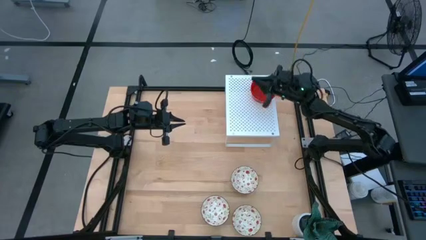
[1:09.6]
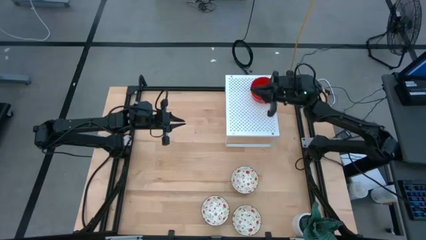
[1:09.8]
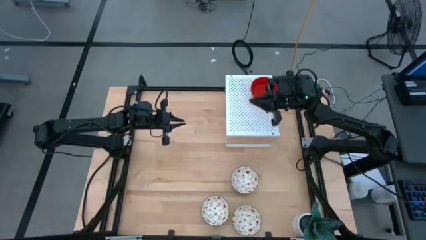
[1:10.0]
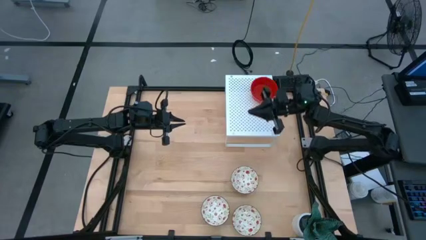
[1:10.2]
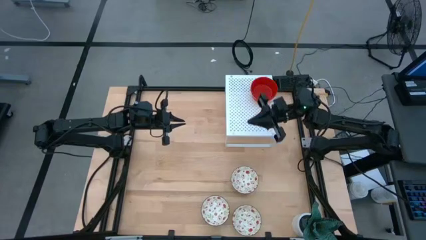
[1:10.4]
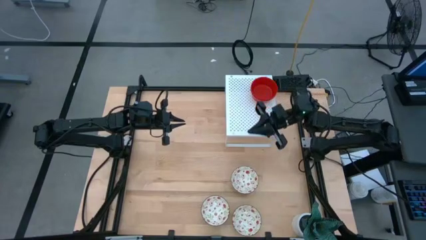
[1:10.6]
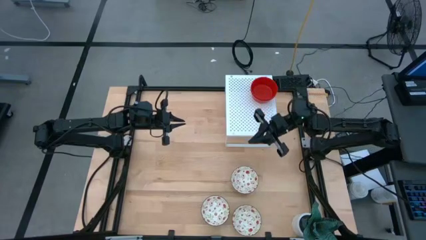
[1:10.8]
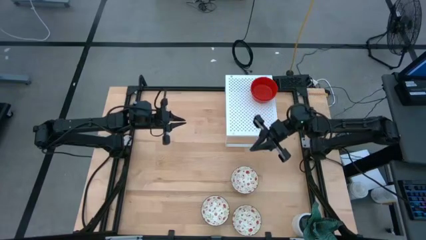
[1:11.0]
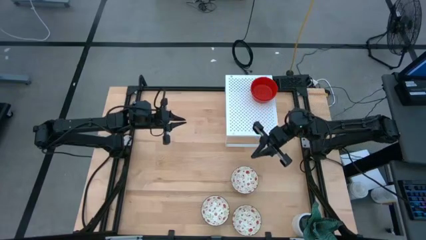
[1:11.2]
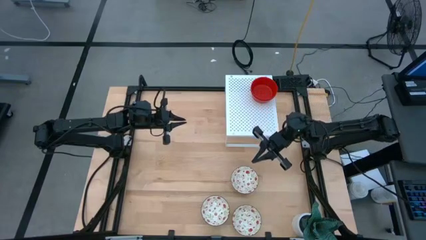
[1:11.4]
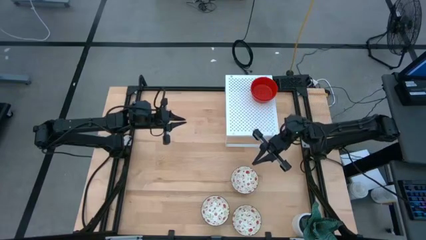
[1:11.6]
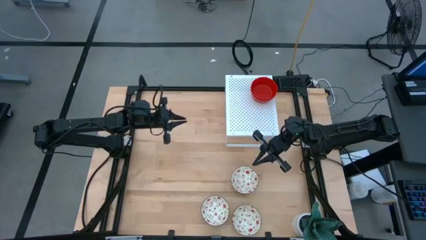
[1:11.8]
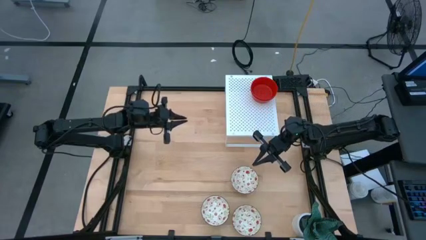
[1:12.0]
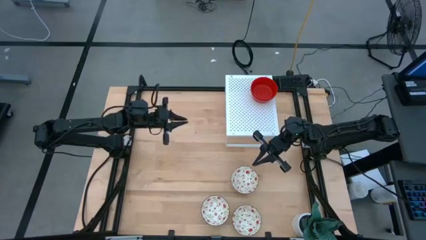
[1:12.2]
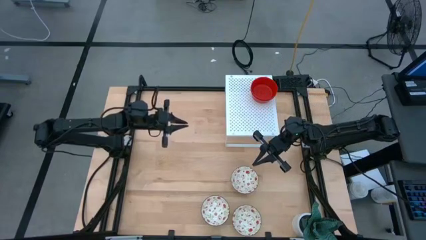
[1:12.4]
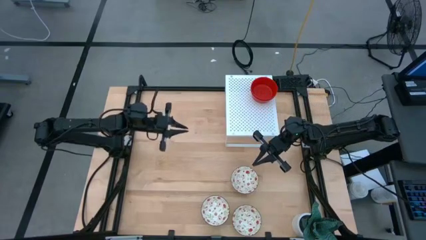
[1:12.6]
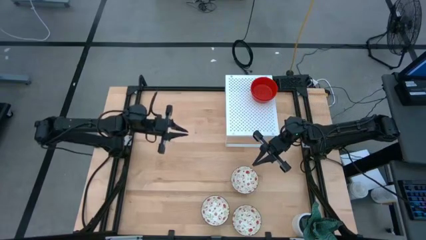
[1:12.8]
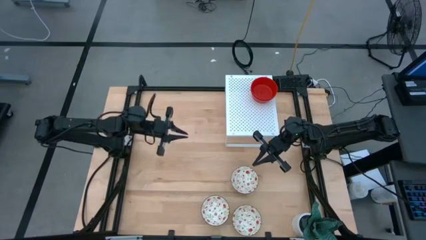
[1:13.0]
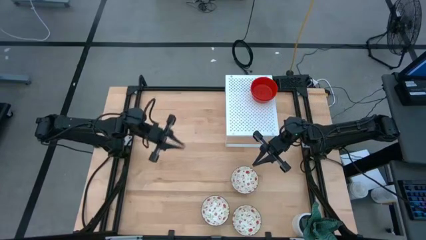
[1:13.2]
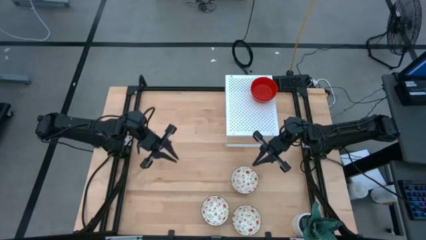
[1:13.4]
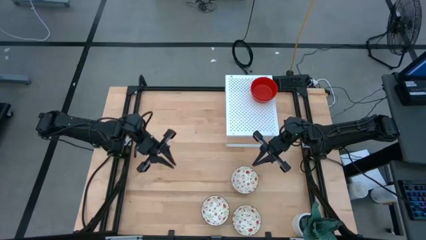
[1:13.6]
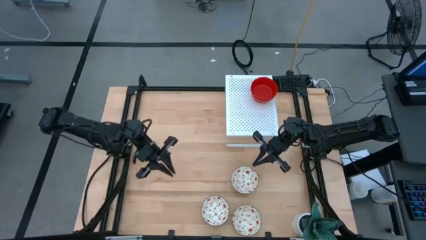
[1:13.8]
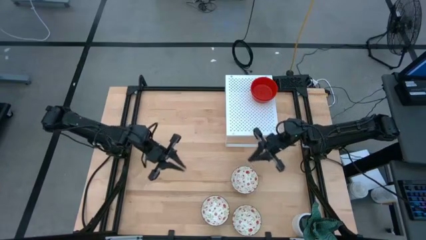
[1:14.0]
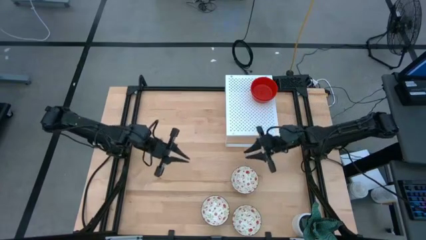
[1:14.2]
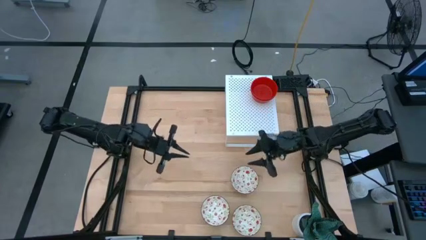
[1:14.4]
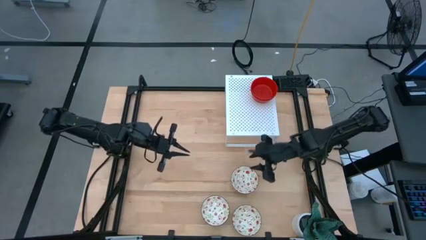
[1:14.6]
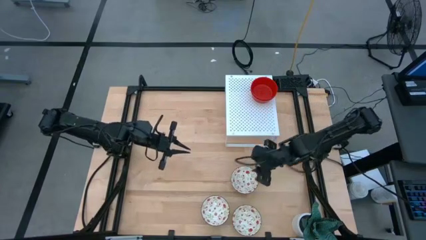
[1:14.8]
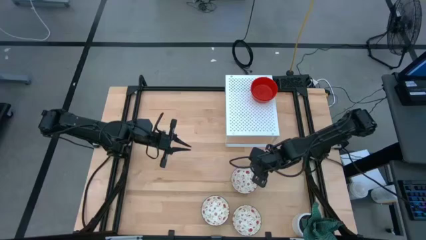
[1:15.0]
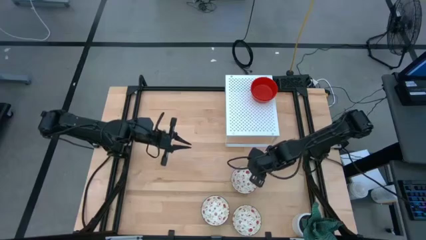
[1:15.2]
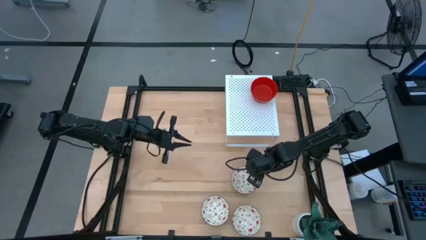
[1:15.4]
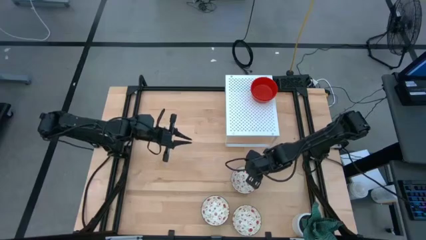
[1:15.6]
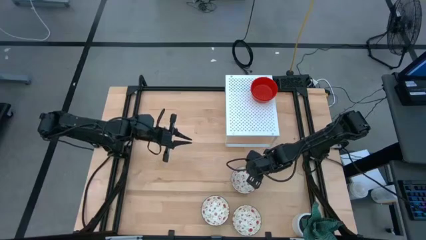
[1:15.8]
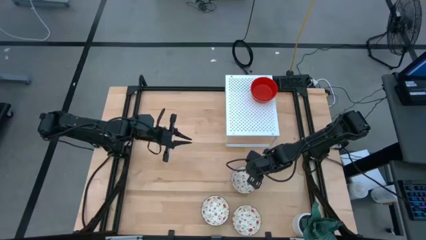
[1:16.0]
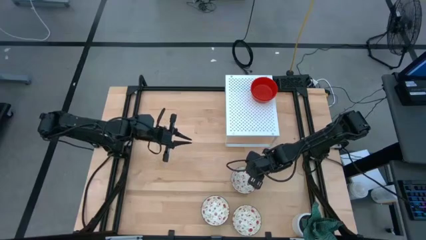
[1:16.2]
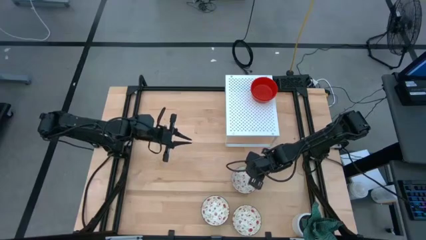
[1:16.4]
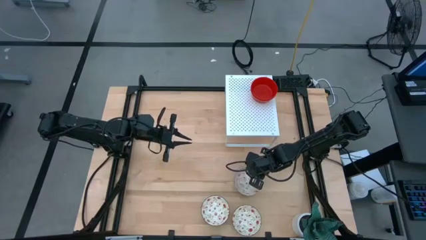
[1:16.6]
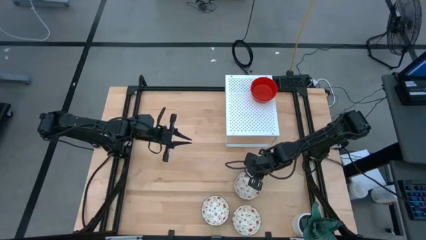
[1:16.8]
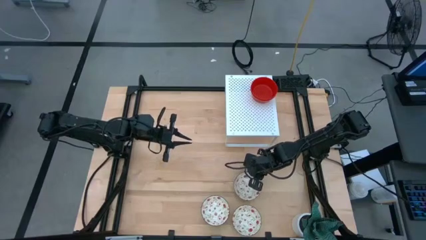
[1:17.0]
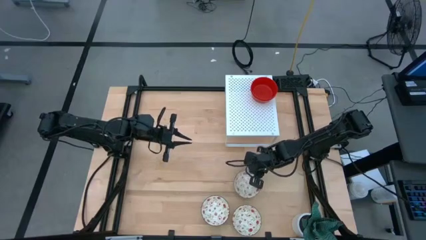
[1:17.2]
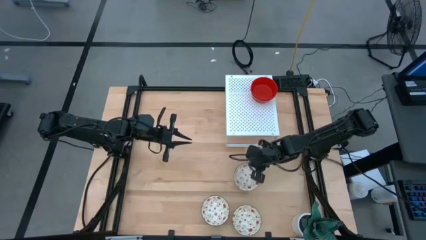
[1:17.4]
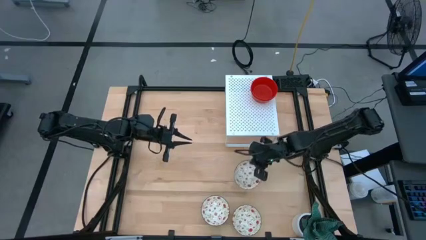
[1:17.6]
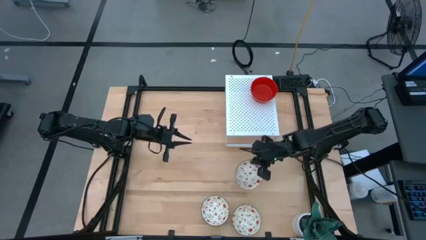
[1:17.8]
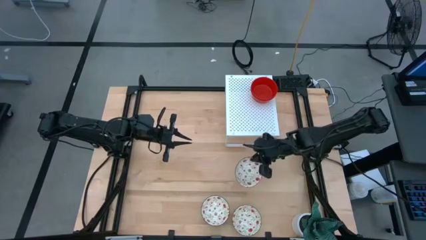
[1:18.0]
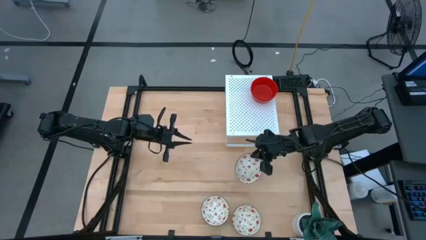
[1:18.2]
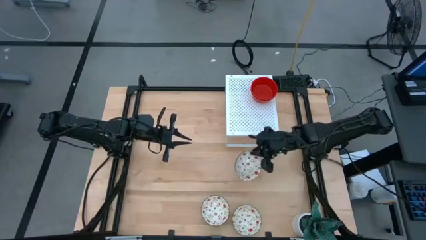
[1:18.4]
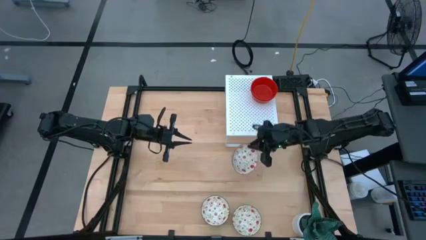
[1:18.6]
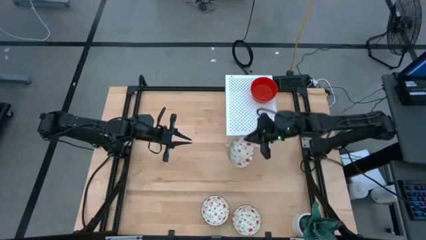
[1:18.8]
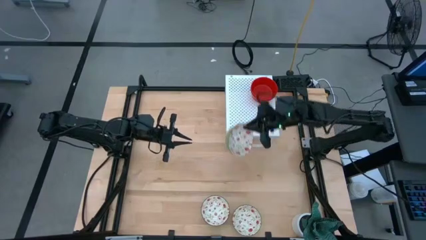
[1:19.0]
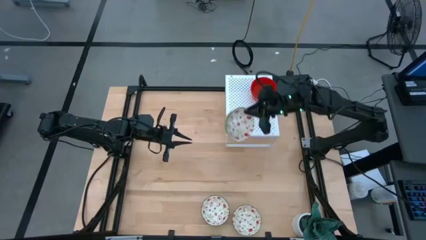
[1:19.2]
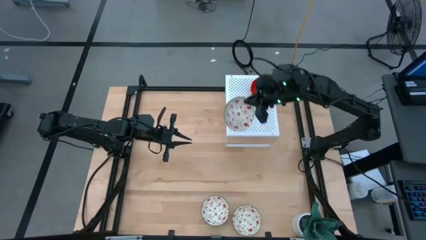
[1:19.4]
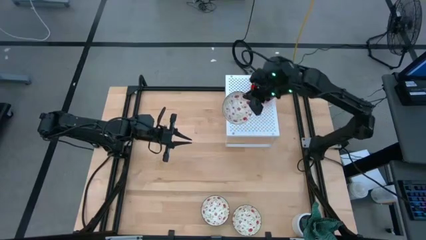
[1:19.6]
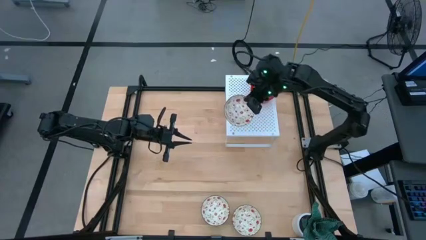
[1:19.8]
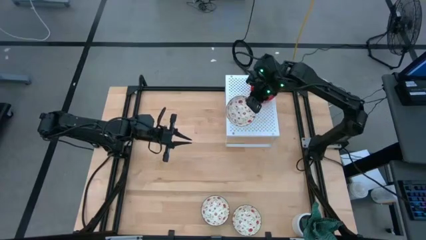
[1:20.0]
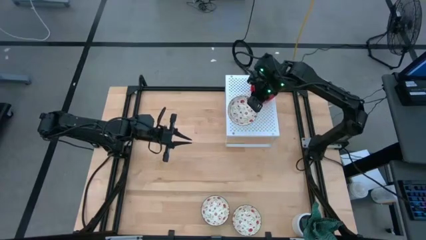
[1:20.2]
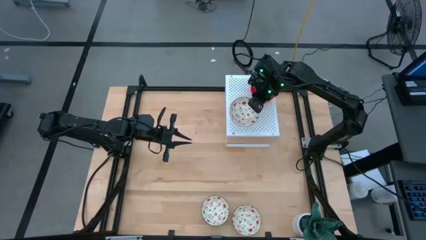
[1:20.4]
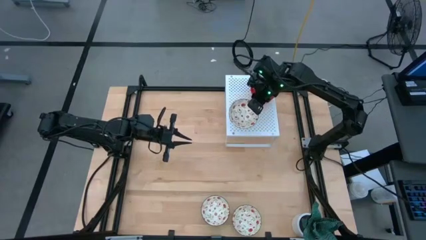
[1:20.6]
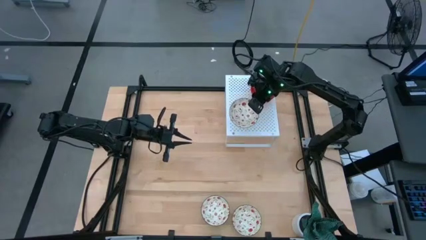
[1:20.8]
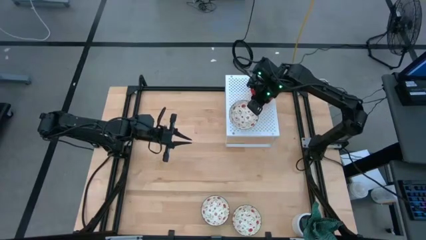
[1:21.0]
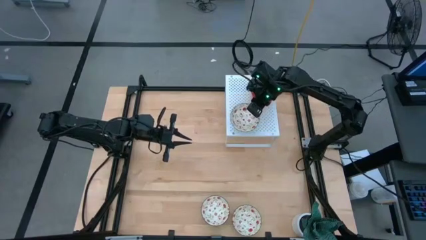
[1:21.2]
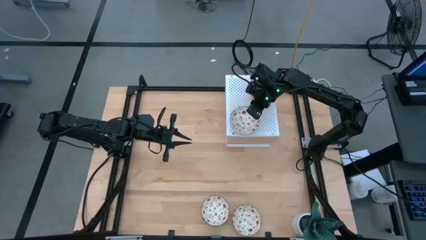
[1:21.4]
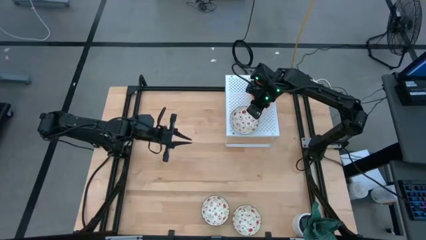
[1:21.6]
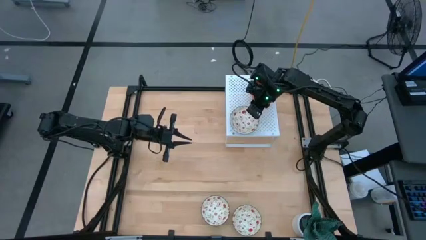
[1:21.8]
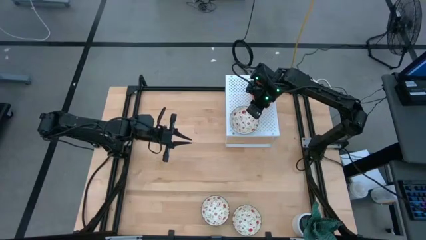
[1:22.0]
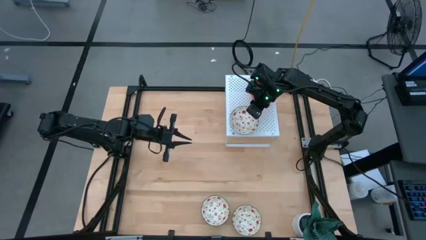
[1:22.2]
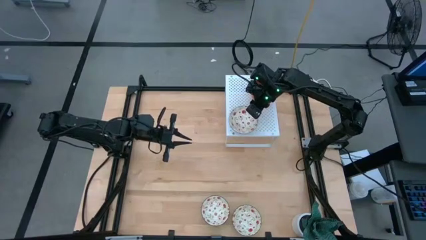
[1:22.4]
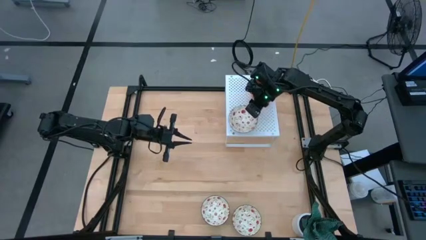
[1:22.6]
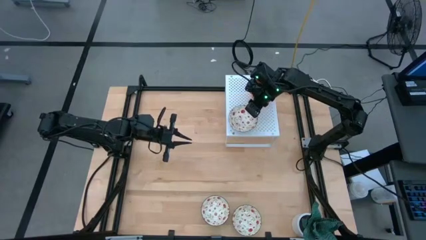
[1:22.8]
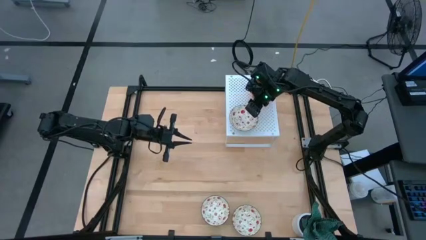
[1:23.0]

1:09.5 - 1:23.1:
Task: Pick & Place Mini bowls
Put the top green bowl on the shelf
